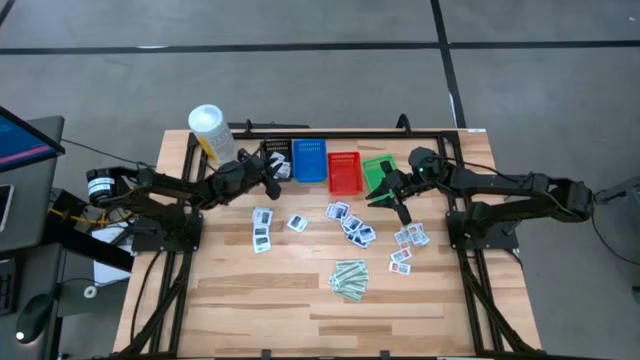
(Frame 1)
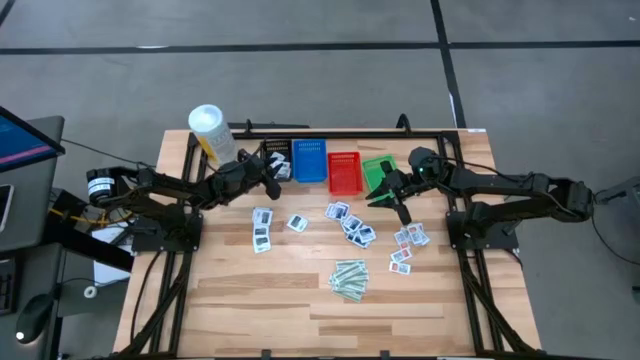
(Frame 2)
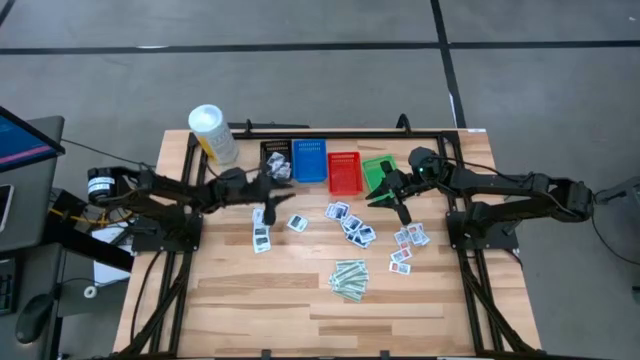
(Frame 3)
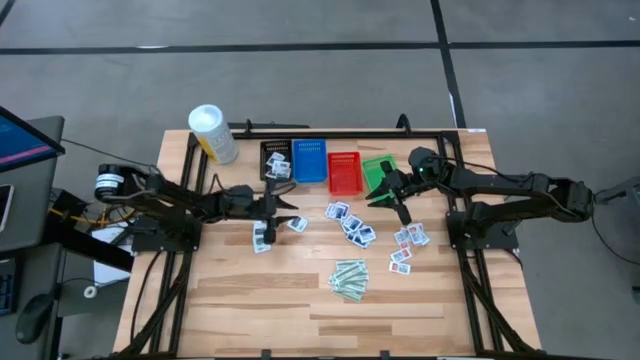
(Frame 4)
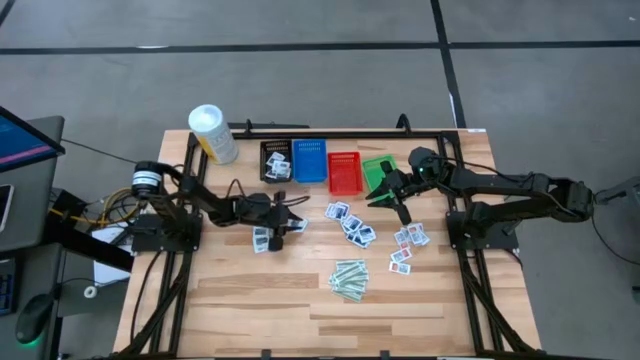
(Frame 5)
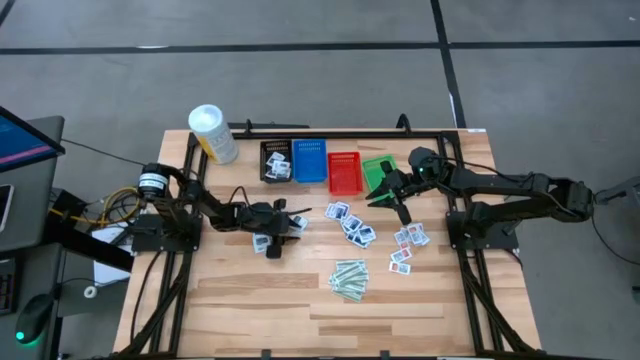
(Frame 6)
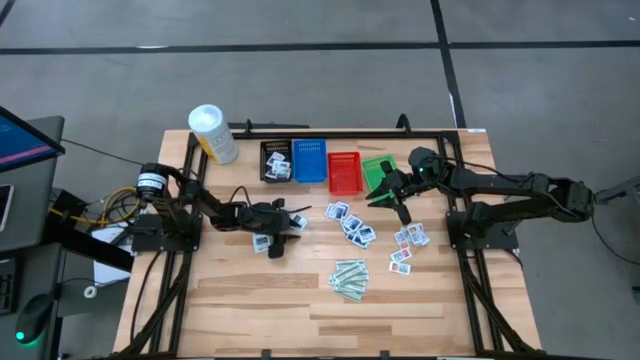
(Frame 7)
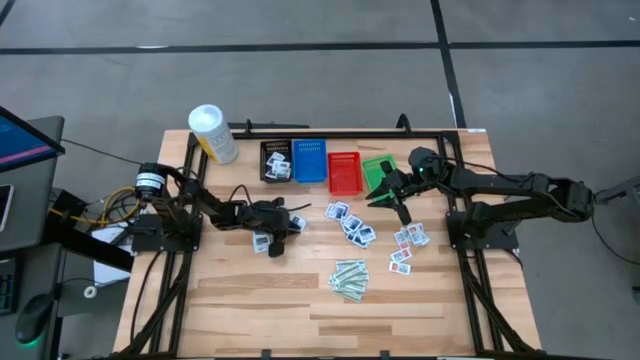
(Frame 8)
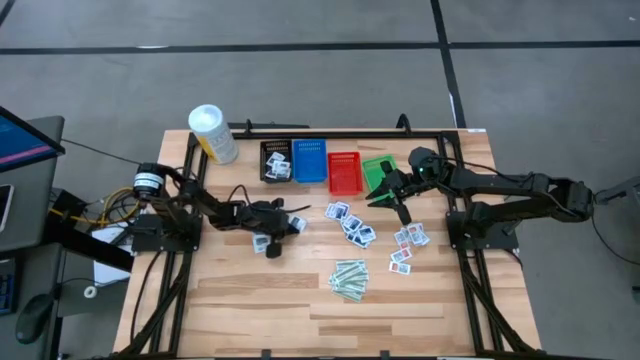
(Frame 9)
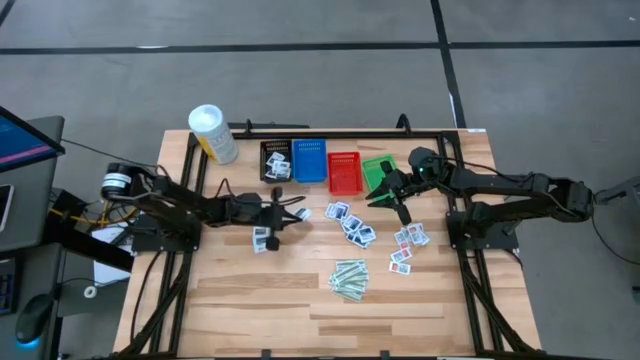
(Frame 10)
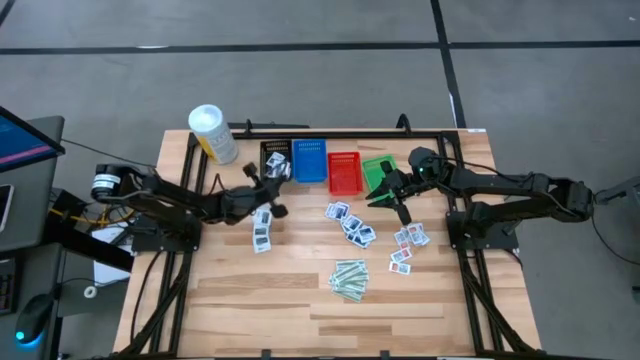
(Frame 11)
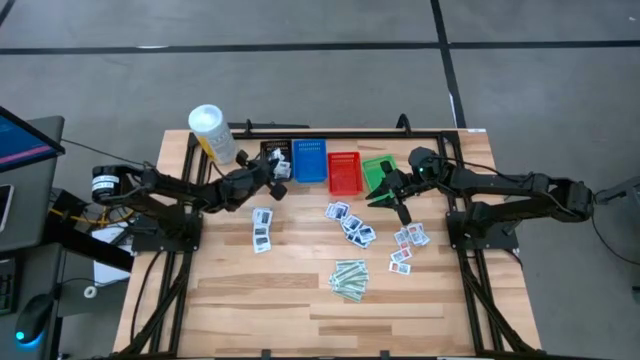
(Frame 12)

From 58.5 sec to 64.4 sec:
Task: Pick & Place First Aid Supplies
Put the gray pad into the black bin

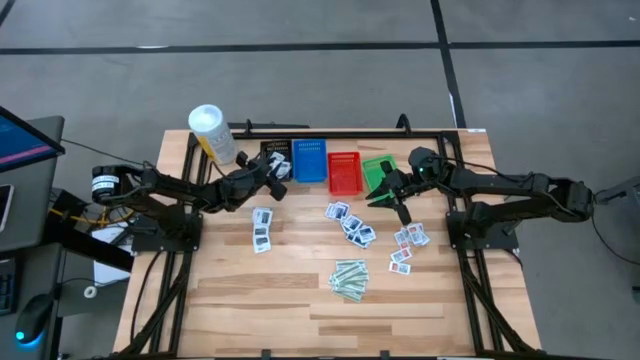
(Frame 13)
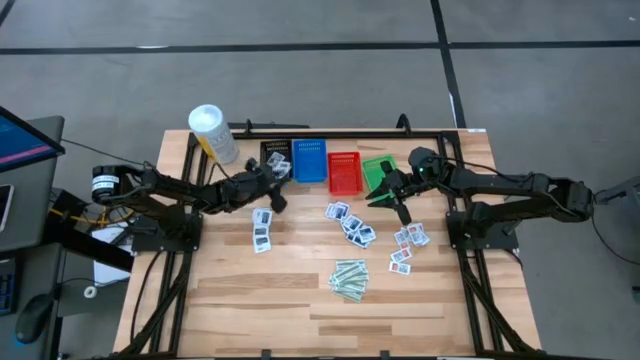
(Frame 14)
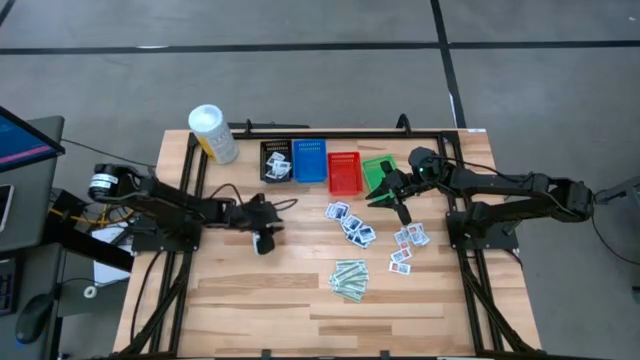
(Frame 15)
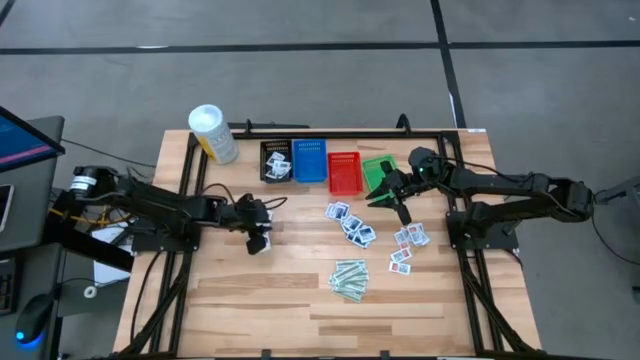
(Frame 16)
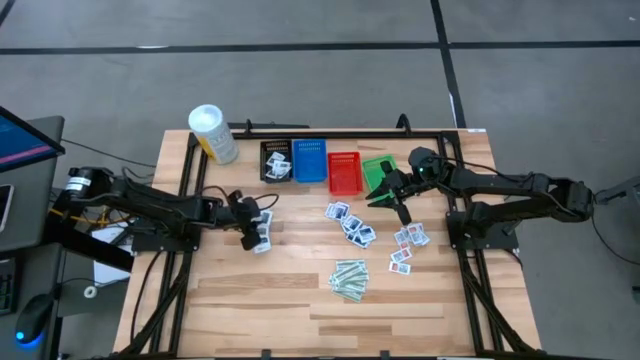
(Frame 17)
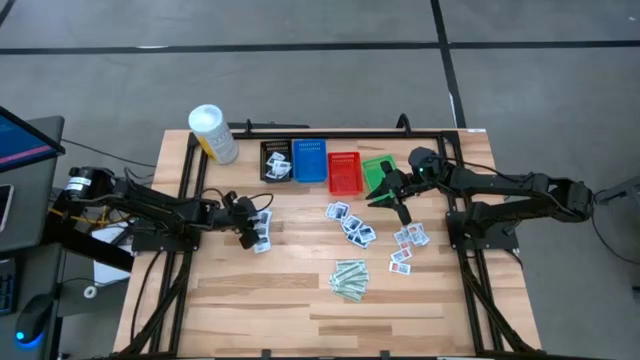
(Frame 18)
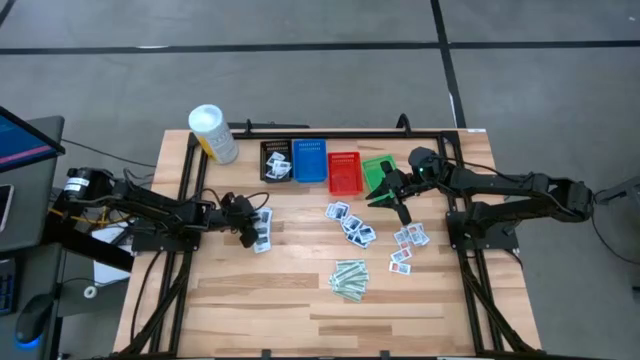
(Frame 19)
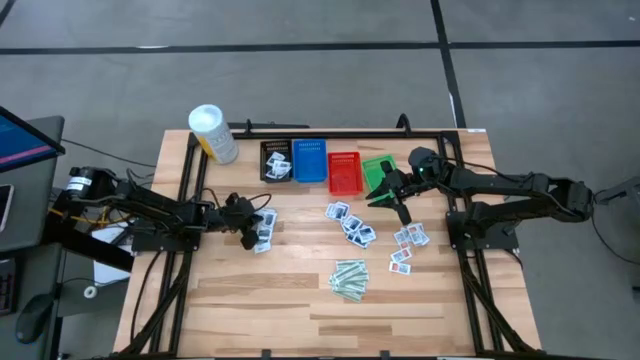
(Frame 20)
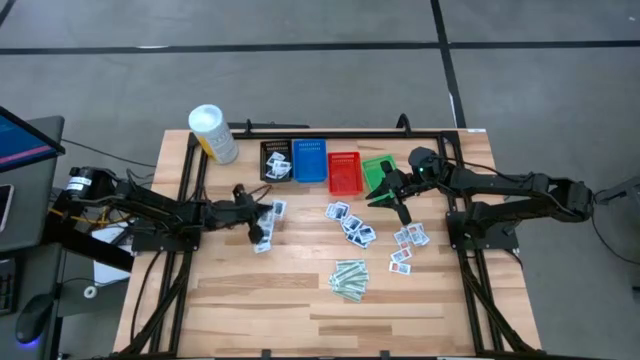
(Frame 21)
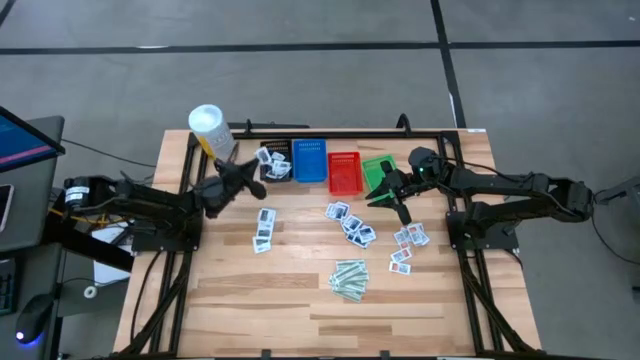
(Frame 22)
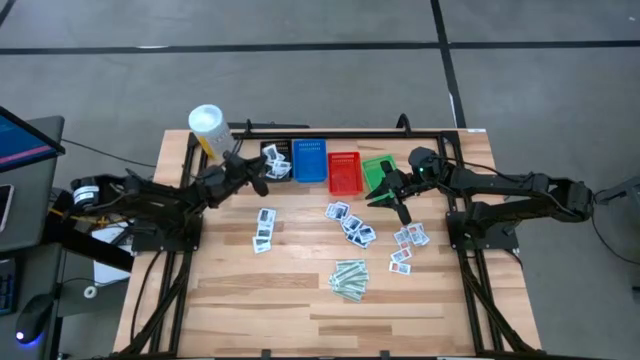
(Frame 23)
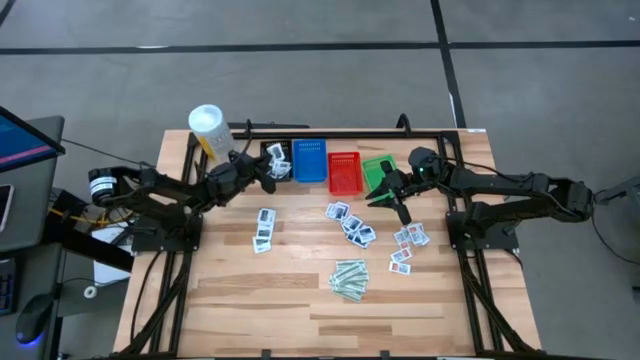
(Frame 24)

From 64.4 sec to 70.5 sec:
Put the gray pad into the black bin

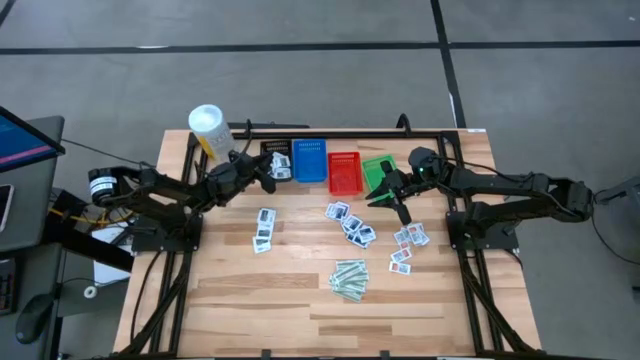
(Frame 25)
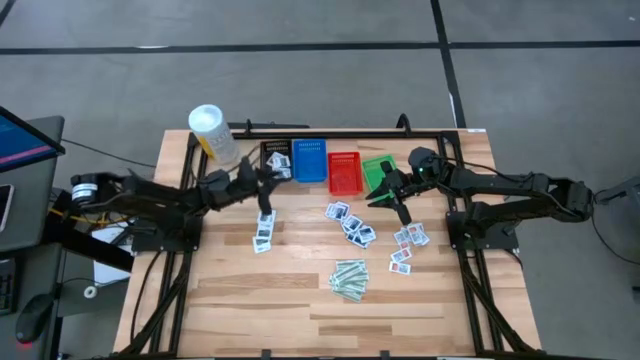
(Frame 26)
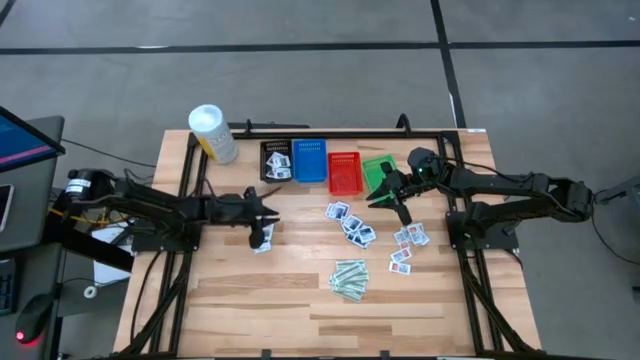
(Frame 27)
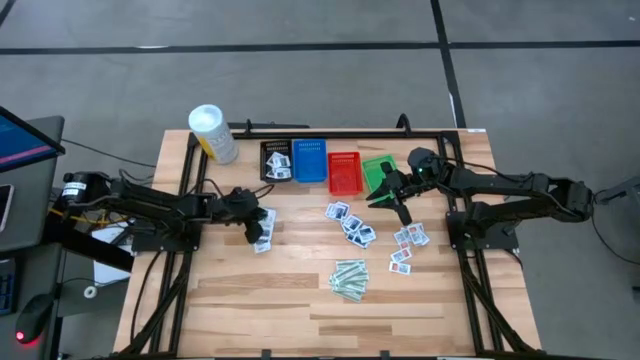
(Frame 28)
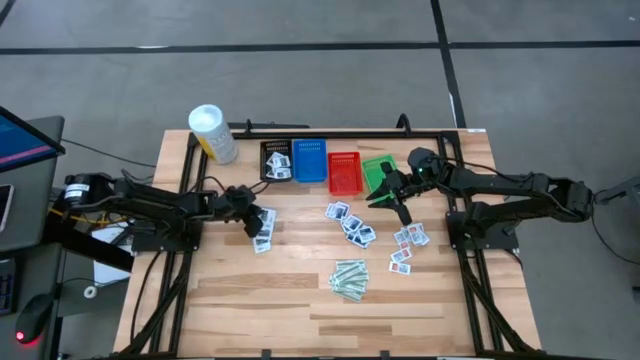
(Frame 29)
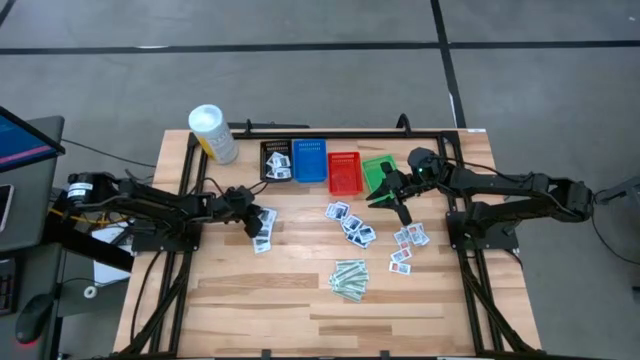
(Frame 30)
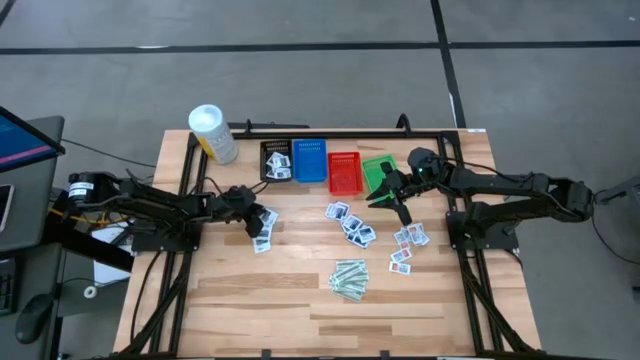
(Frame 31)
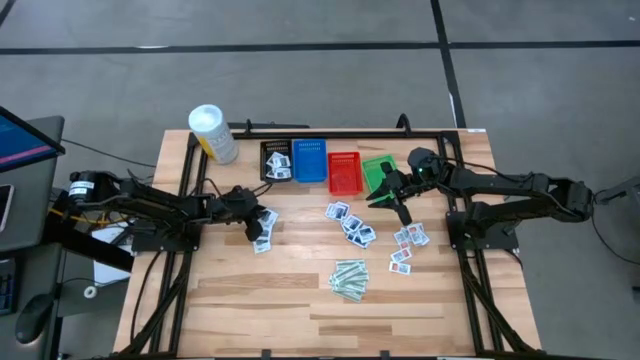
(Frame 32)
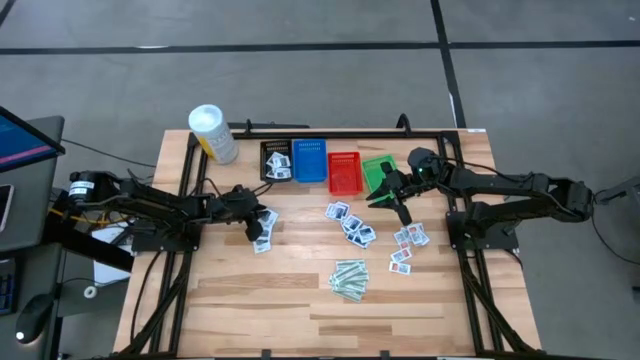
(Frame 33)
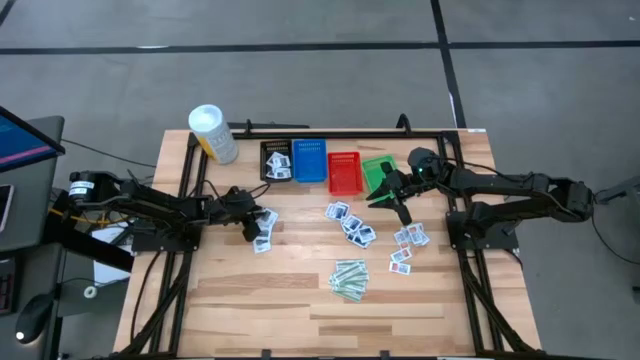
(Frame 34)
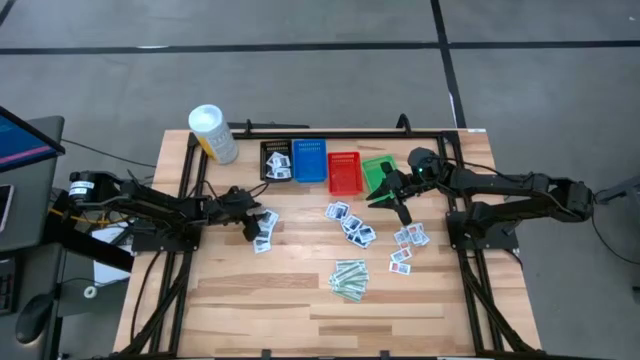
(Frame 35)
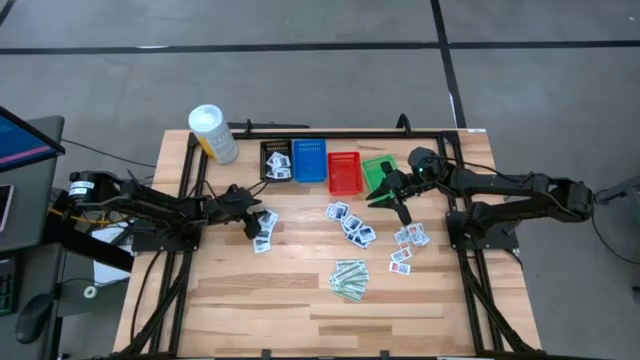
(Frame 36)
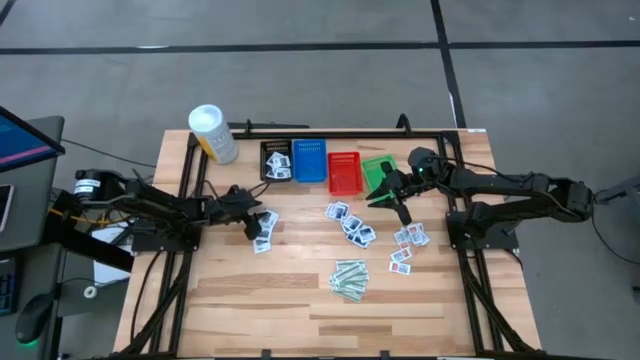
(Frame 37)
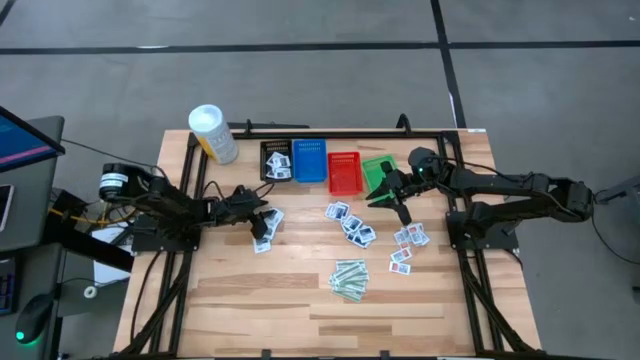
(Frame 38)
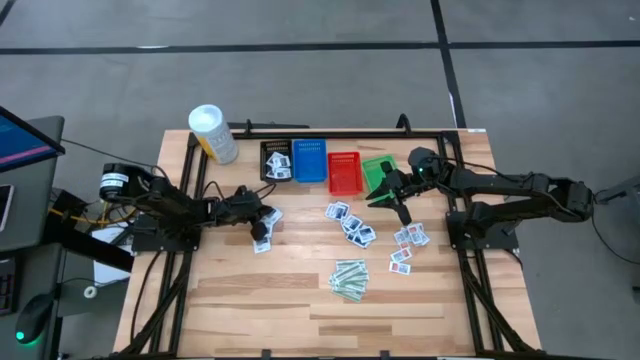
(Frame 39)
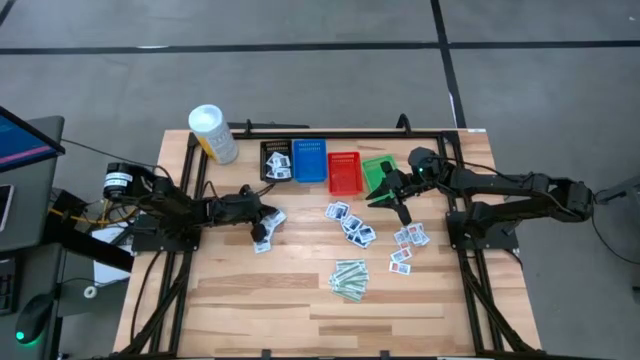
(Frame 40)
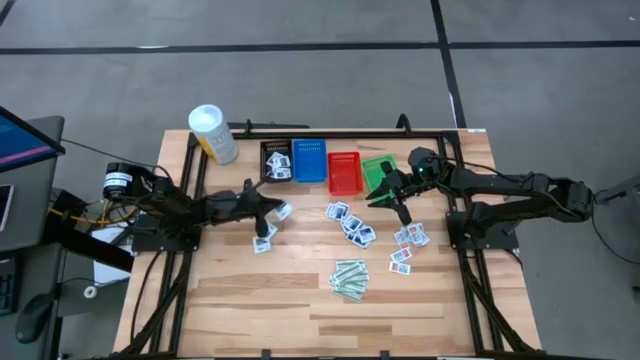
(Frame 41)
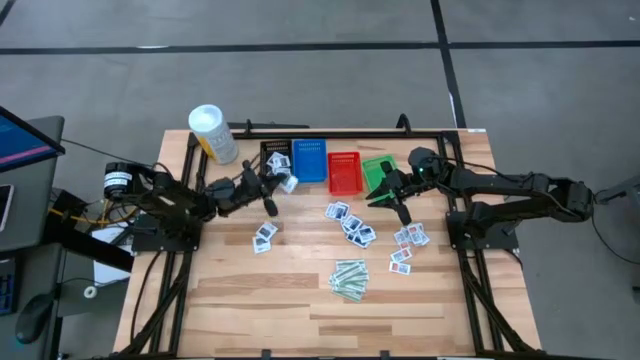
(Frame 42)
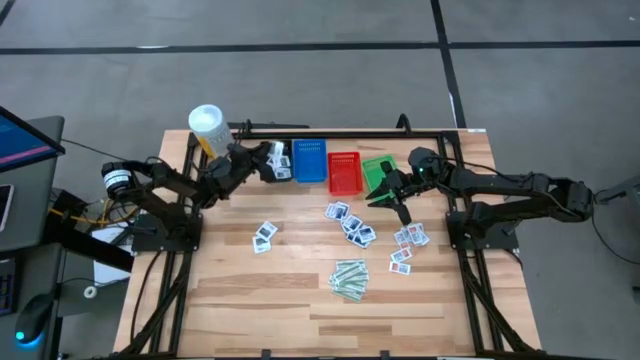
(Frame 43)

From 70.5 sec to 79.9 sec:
Put the gray pad into the black bin
